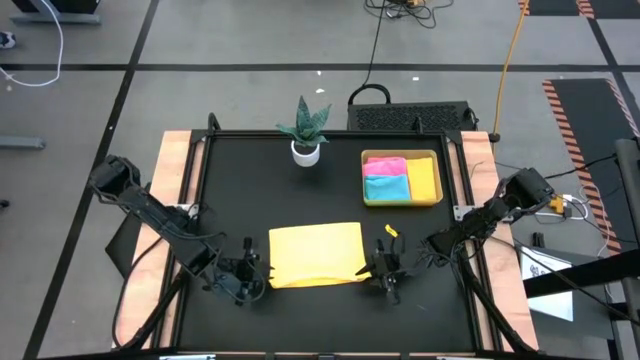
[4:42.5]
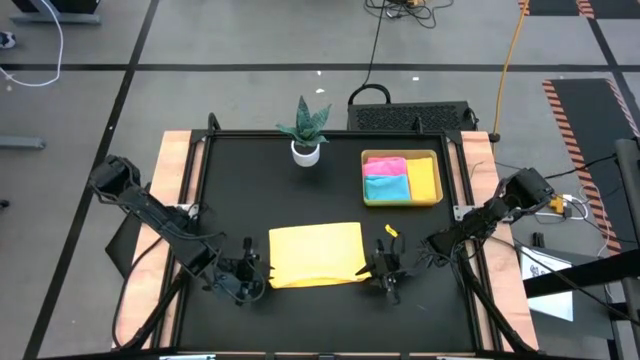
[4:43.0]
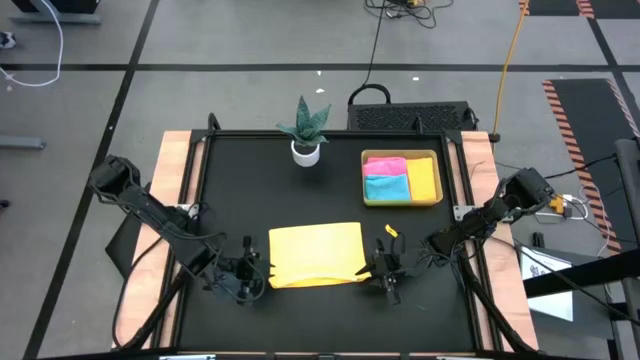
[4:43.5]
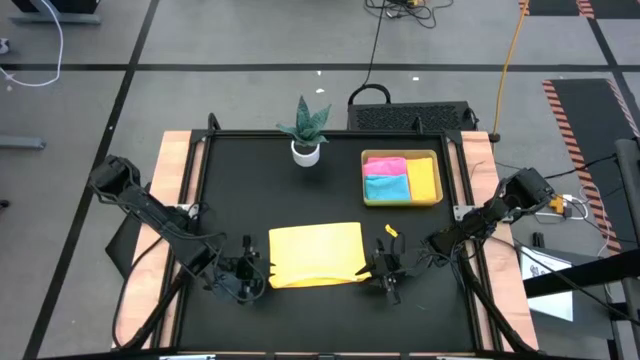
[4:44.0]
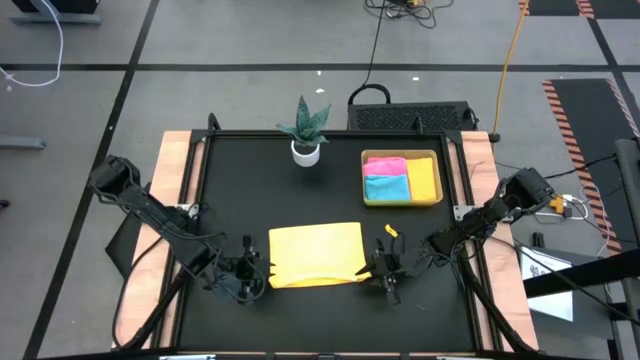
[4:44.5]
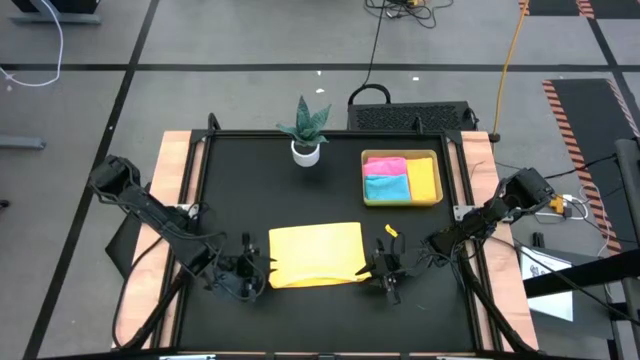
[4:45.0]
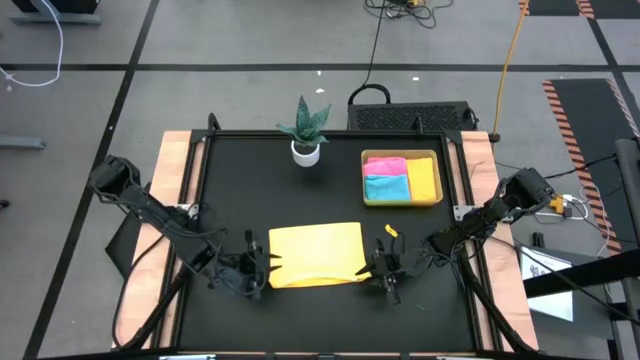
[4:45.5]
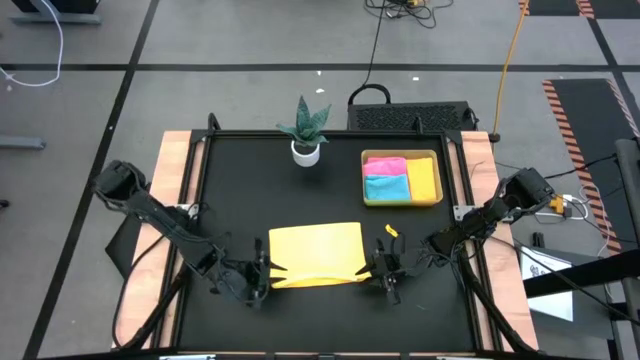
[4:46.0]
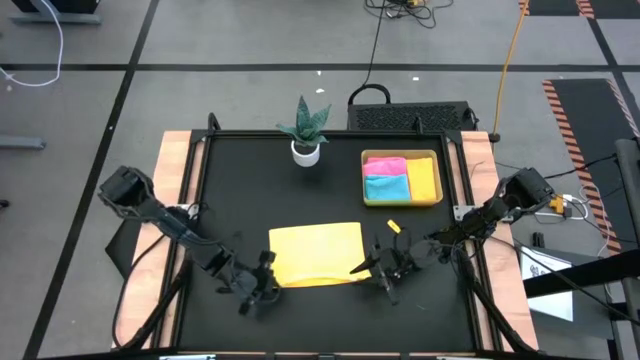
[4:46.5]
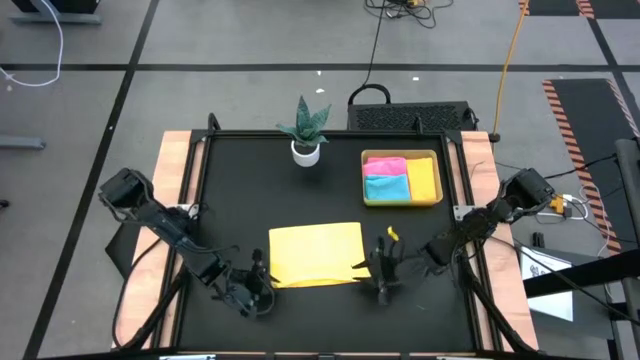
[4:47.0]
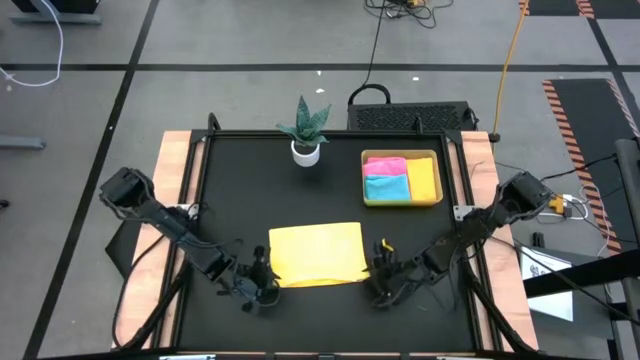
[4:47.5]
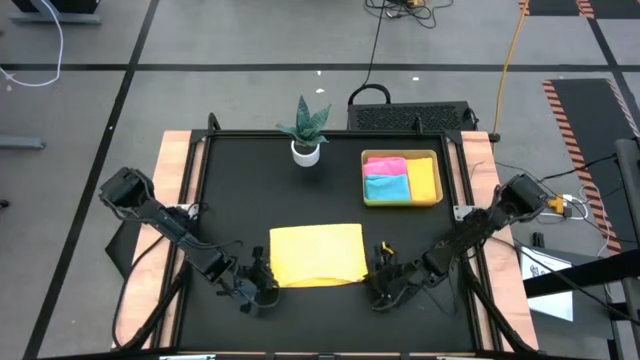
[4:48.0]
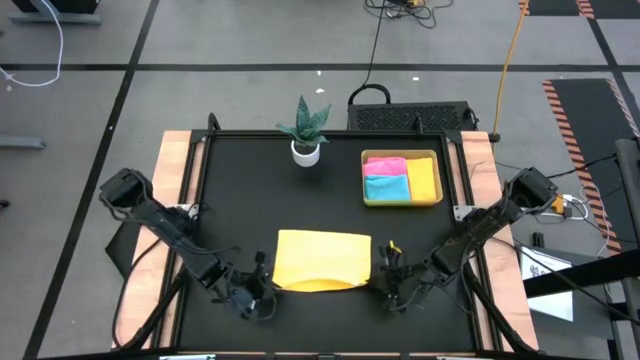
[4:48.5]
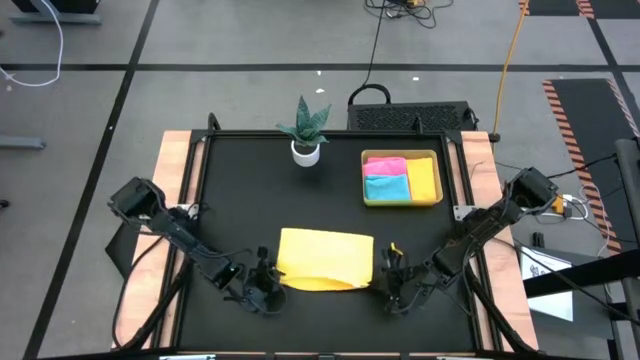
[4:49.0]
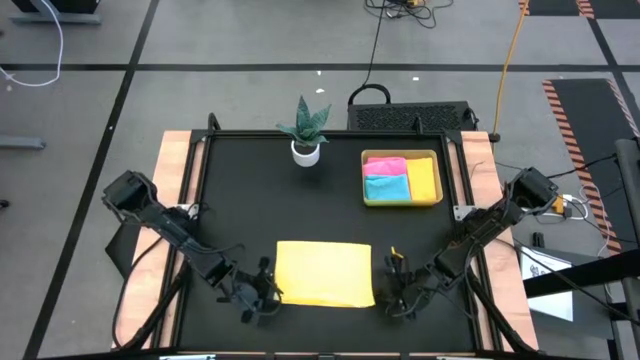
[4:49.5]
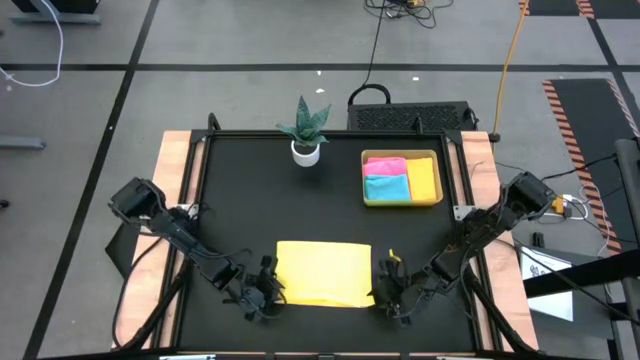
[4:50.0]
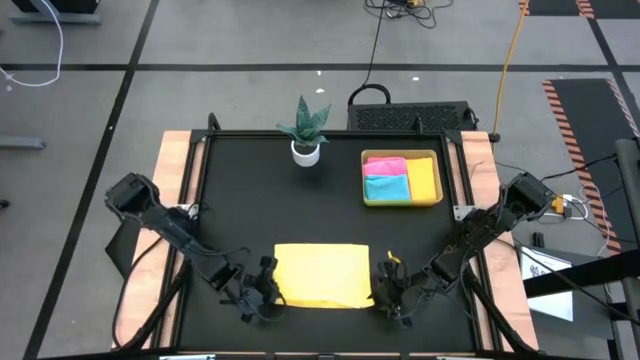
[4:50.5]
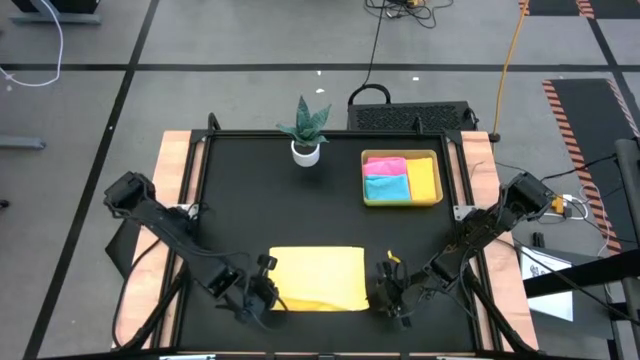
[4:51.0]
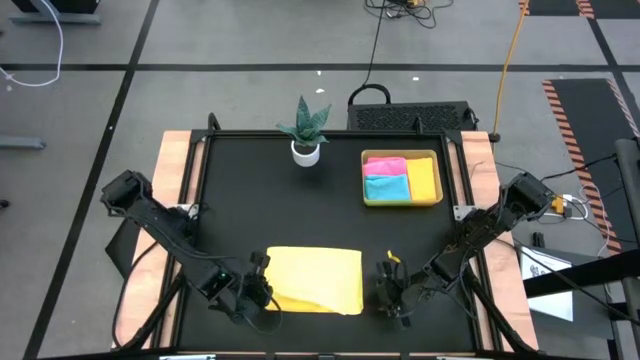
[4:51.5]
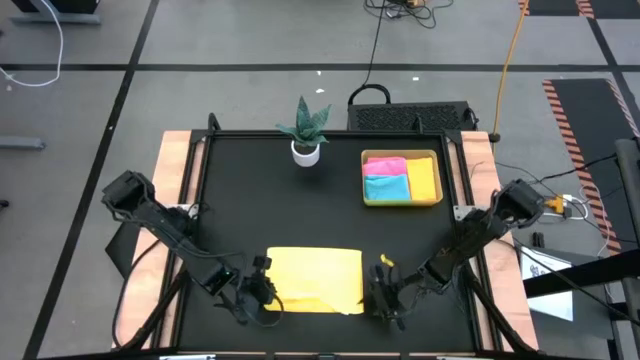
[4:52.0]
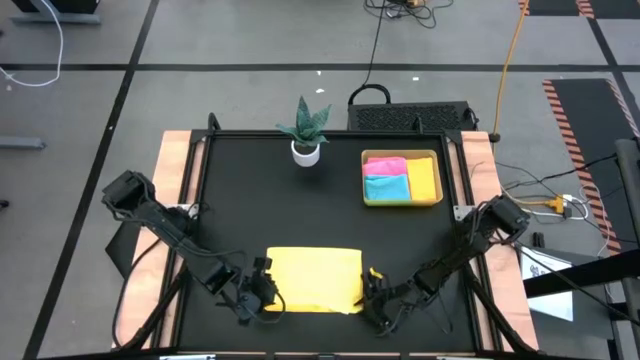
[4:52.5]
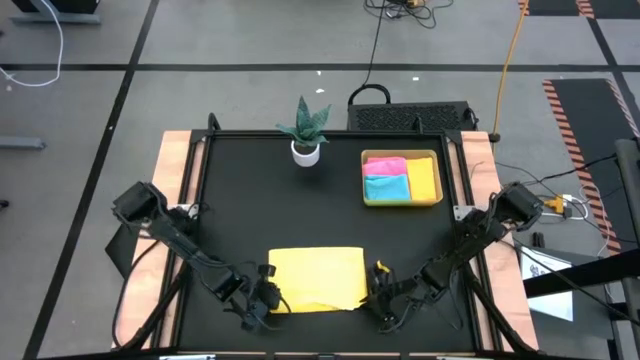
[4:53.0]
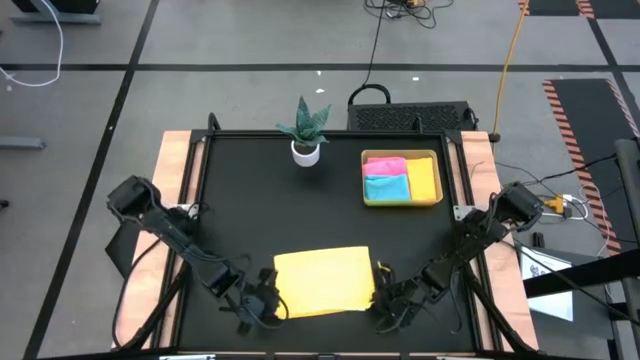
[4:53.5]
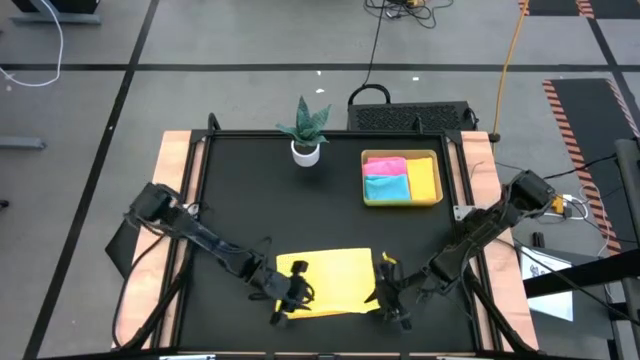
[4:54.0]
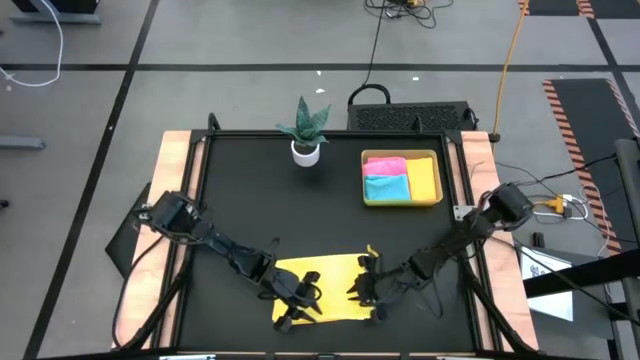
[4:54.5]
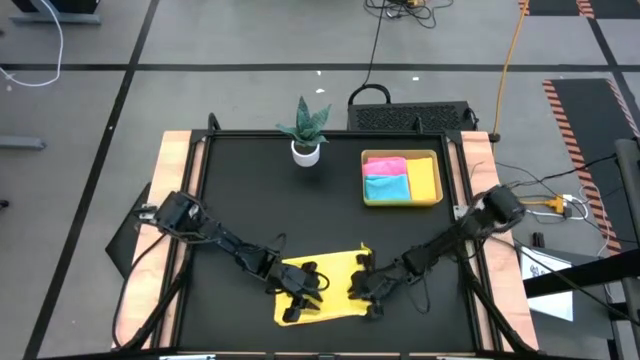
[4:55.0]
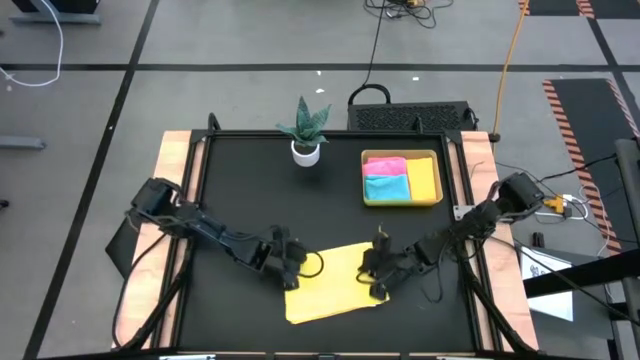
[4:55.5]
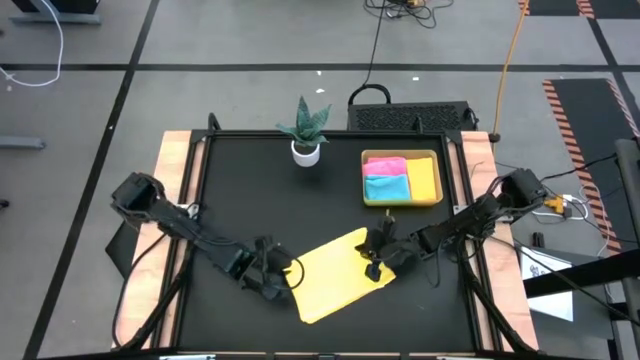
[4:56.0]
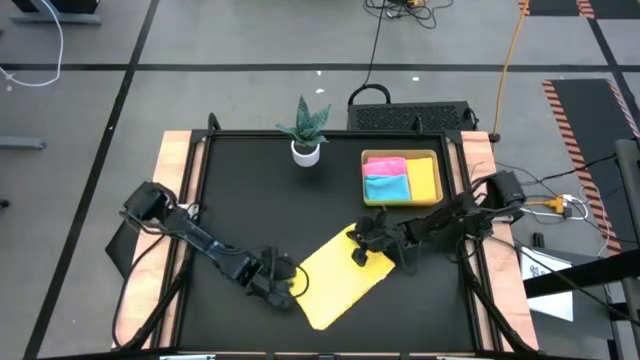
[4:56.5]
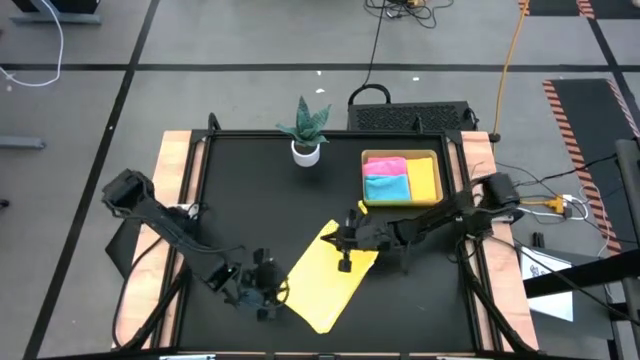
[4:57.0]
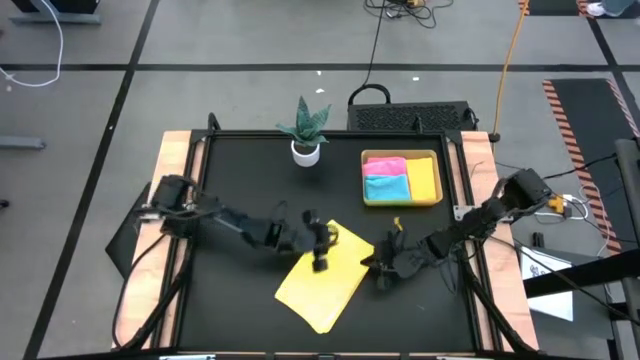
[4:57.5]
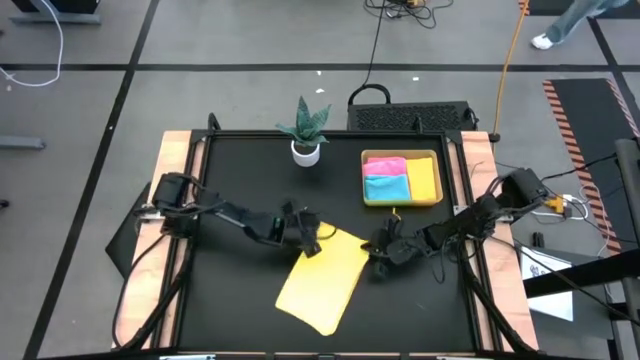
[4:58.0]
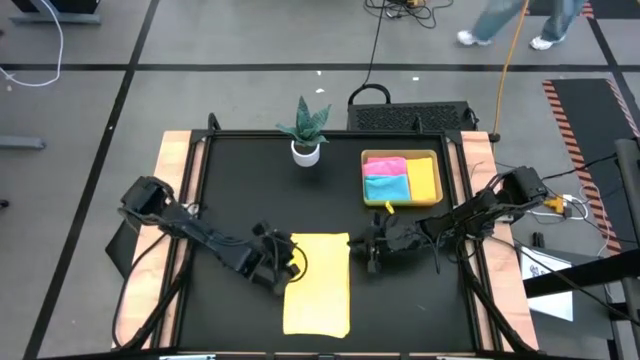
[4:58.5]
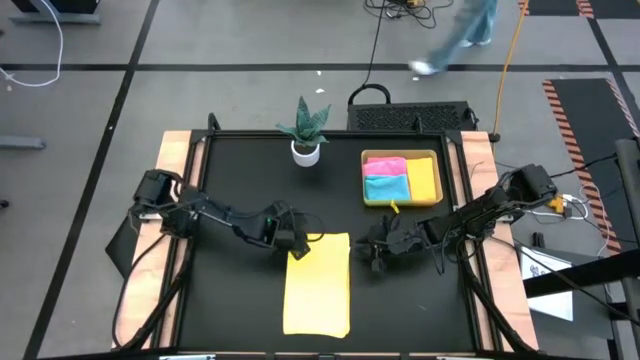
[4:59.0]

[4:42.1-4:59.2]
Task: Fold microfiber towels
Fold the yellow microfiber cloth

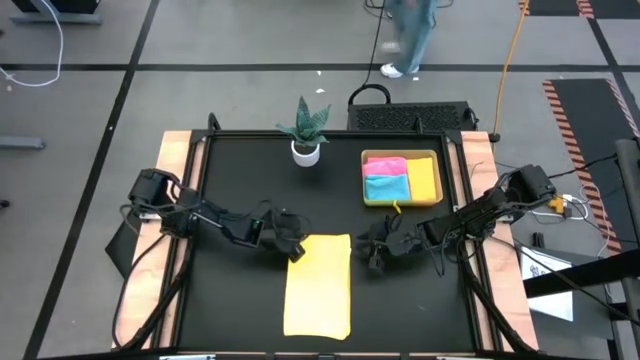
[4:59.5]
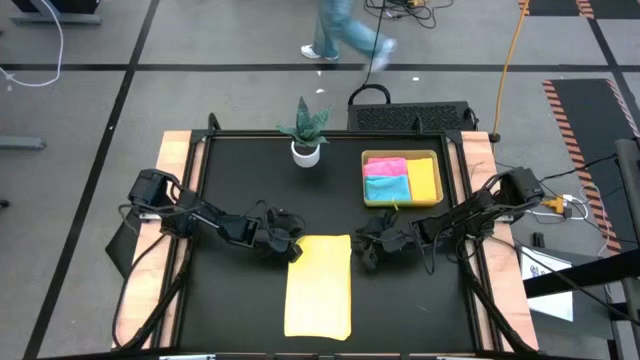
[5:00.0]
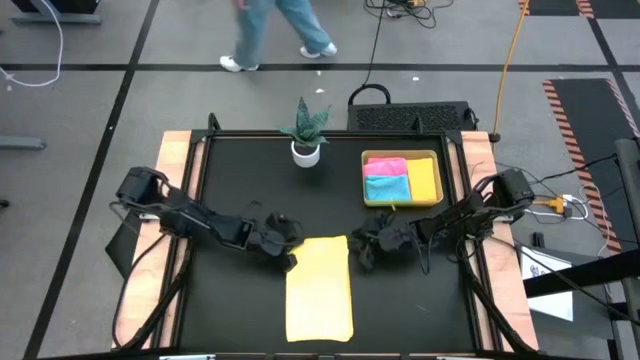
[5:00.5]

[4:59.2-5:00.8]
Fold the yellow microfiber cloth

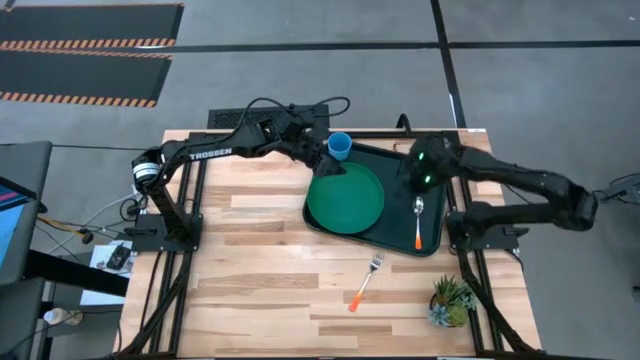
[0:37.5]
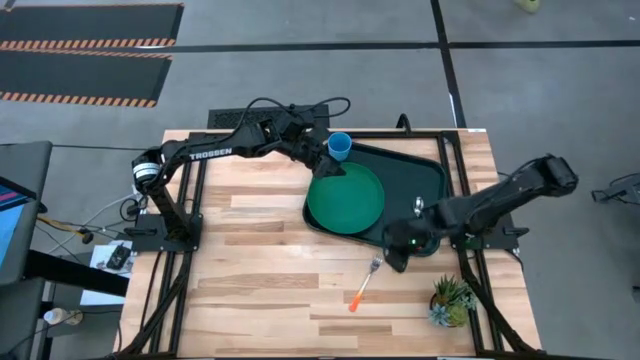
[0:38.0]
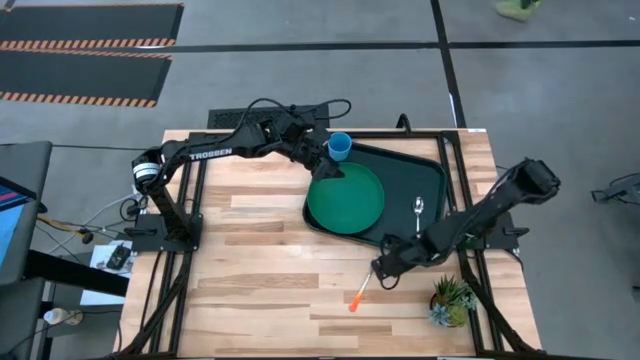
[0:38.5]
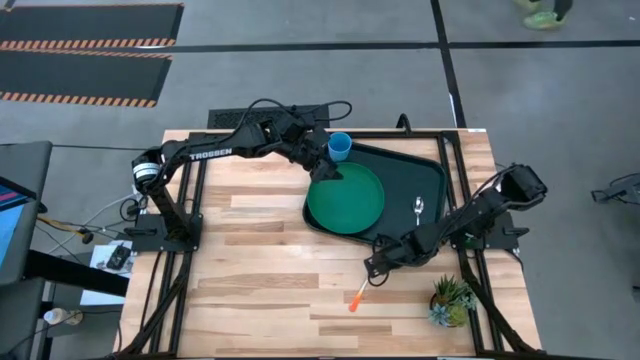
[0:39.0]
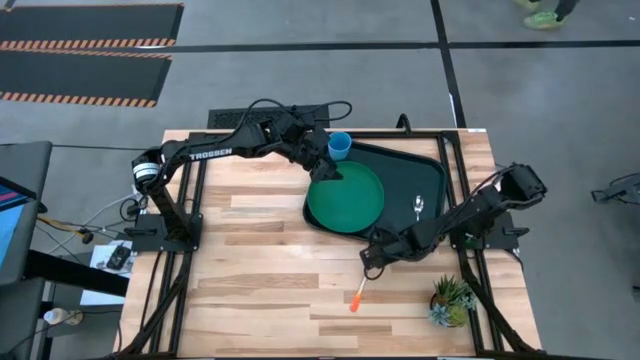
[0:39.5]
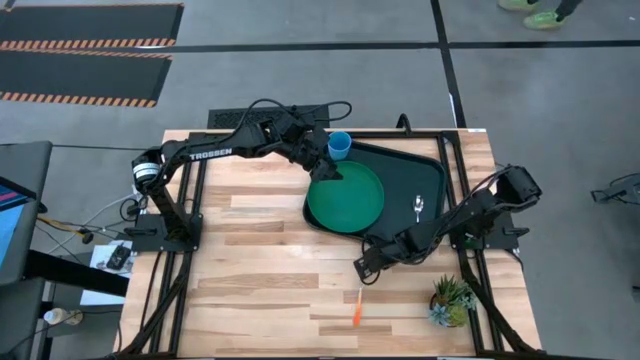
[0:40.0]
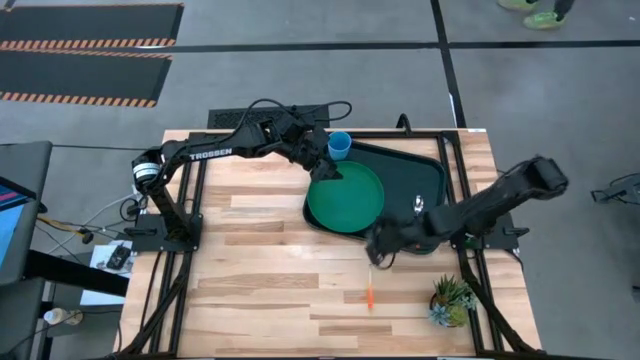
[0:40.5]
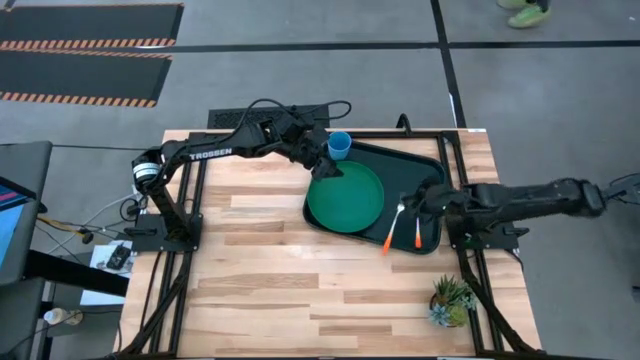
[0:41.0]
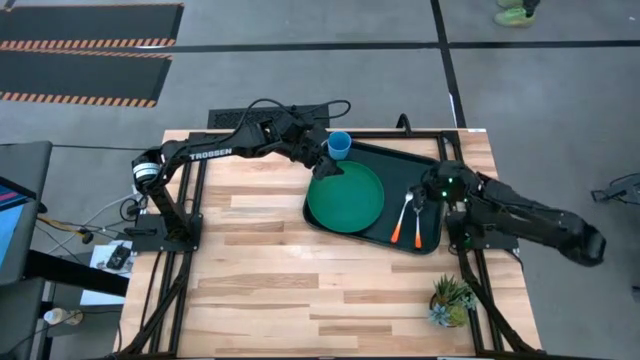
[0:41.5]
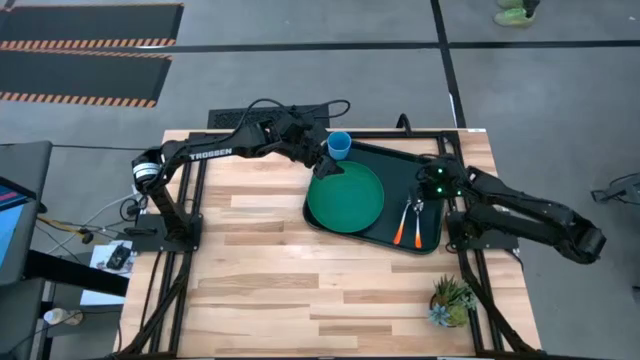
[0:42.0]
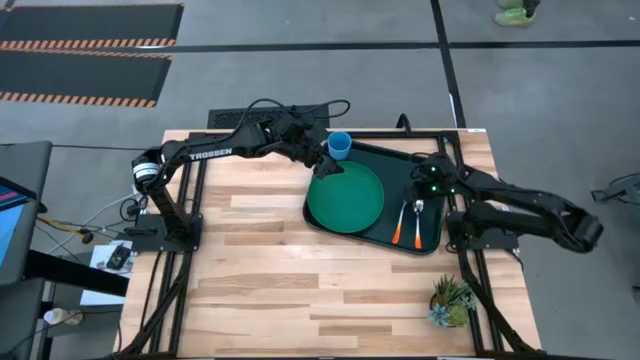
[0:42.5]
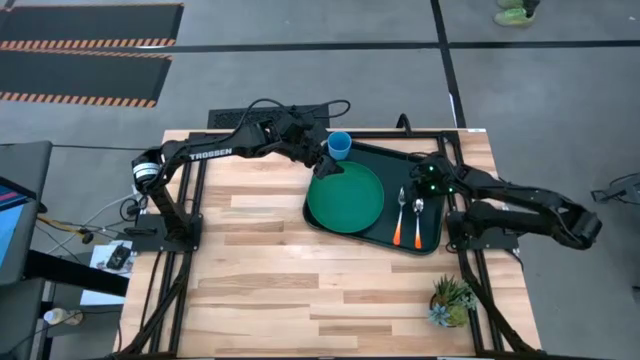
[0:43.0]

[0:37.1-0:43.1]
Task: Pick and place plate/cup/fork/spoon on tray
Put the orange fork on the black tray to the right of the green plate
